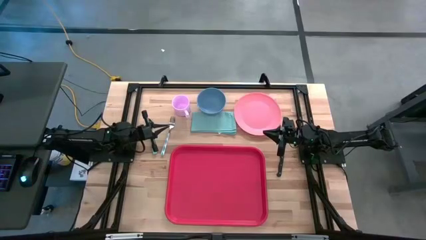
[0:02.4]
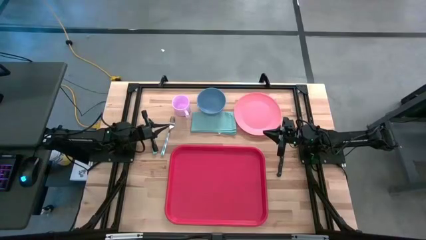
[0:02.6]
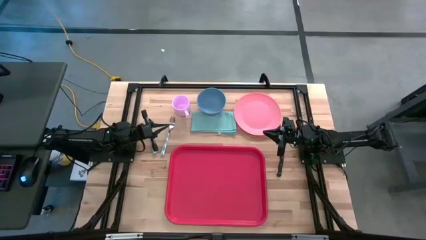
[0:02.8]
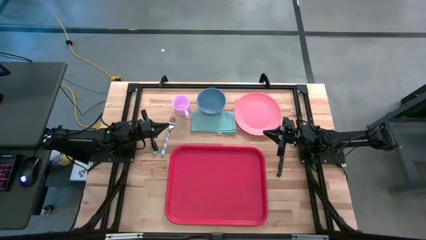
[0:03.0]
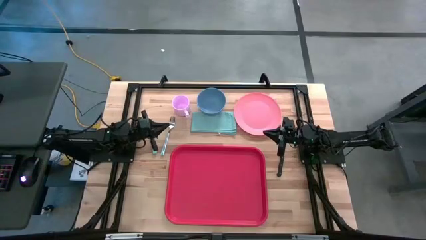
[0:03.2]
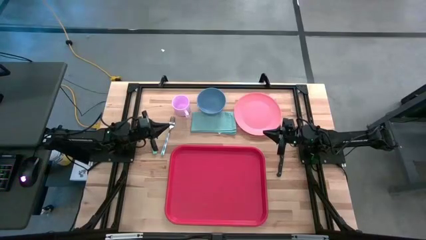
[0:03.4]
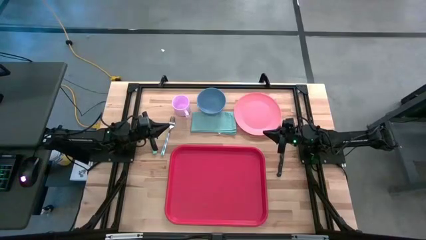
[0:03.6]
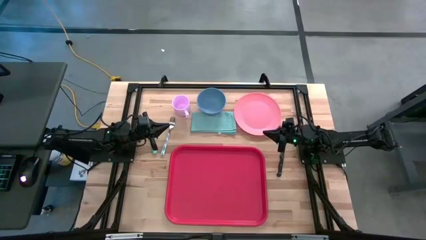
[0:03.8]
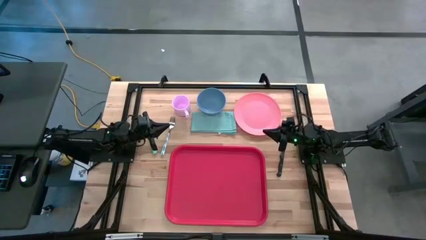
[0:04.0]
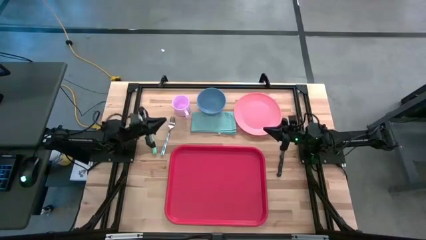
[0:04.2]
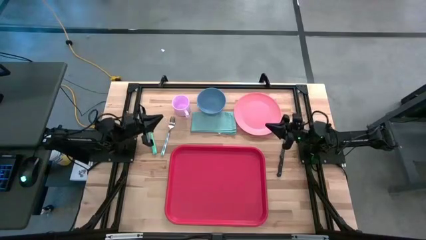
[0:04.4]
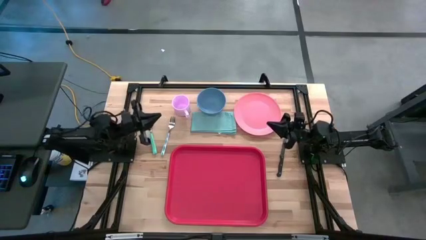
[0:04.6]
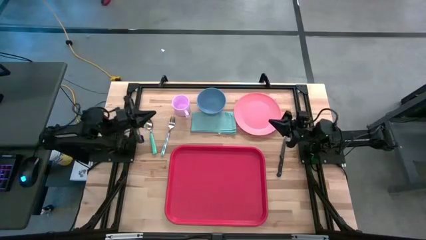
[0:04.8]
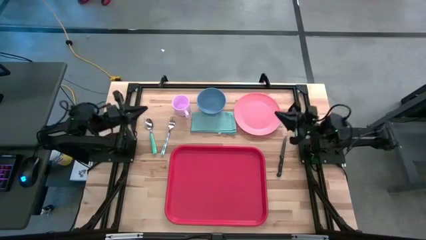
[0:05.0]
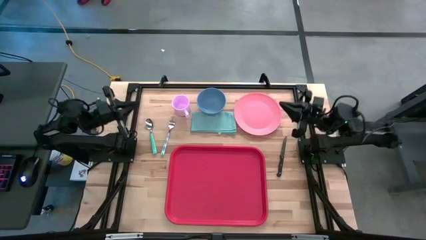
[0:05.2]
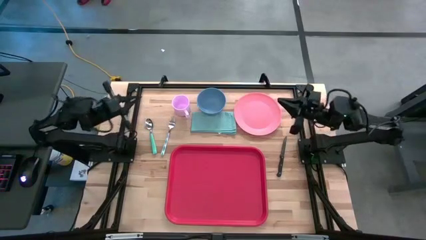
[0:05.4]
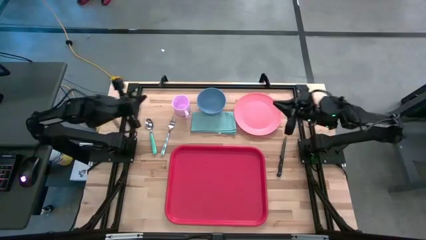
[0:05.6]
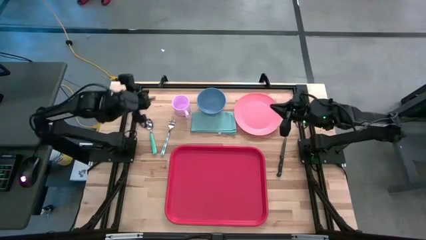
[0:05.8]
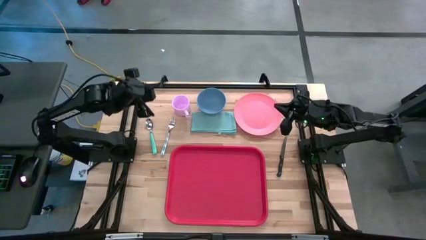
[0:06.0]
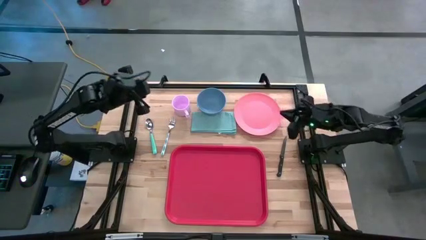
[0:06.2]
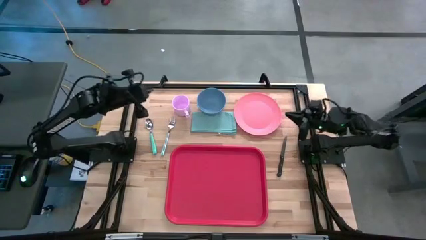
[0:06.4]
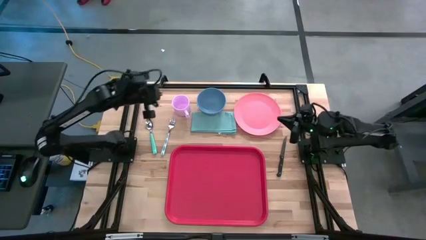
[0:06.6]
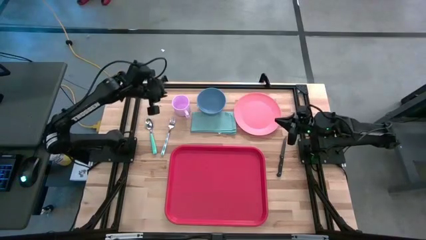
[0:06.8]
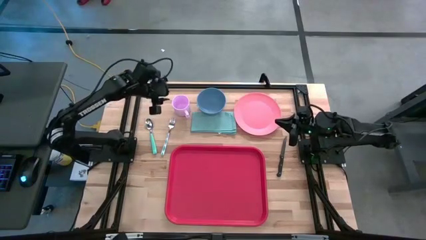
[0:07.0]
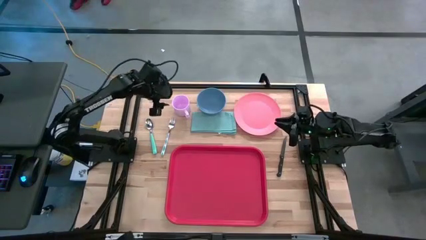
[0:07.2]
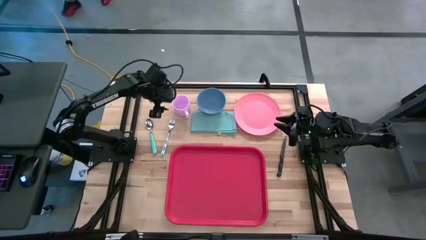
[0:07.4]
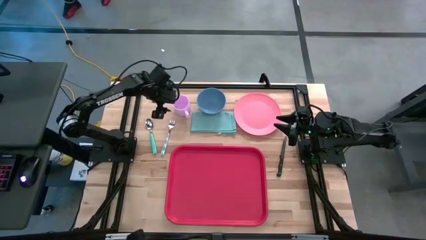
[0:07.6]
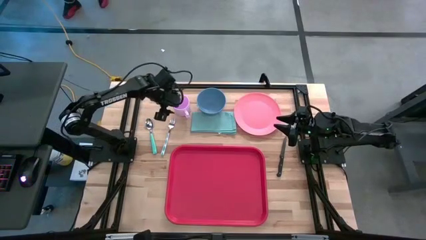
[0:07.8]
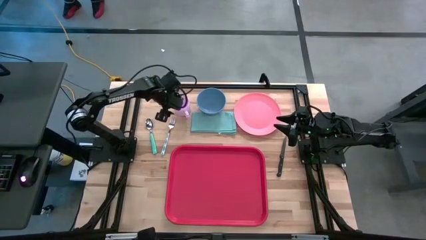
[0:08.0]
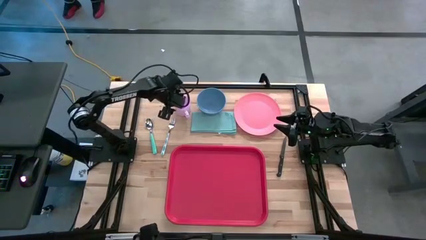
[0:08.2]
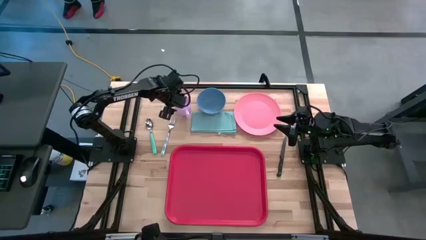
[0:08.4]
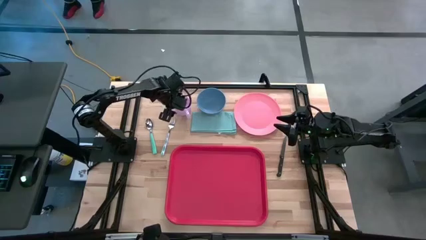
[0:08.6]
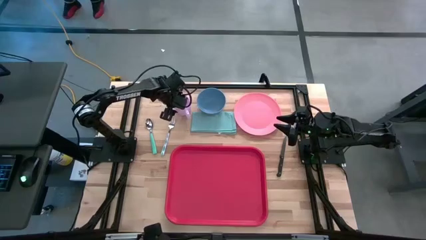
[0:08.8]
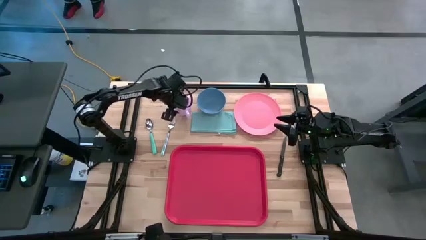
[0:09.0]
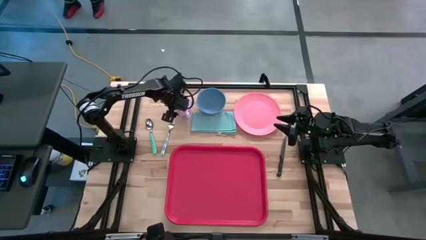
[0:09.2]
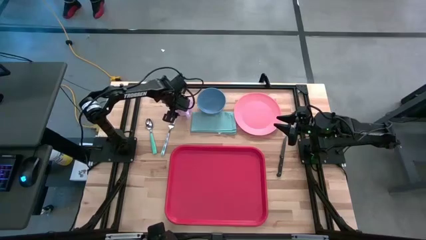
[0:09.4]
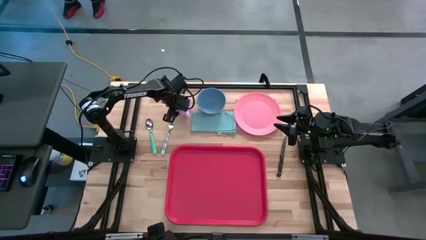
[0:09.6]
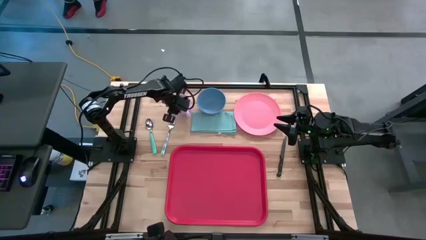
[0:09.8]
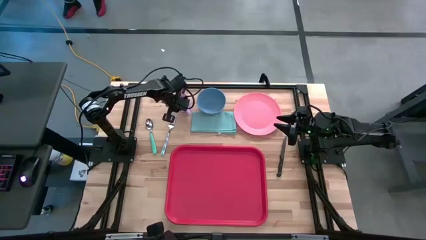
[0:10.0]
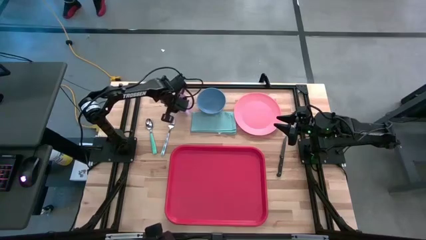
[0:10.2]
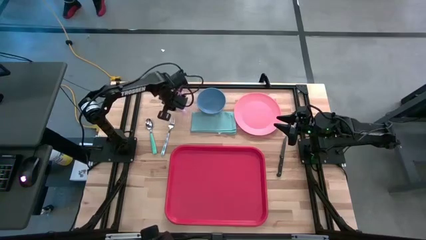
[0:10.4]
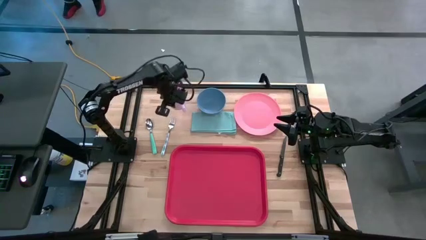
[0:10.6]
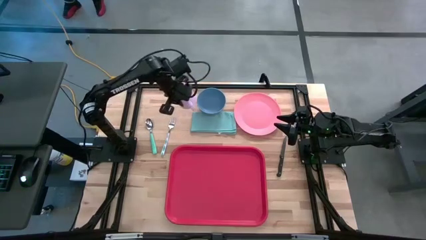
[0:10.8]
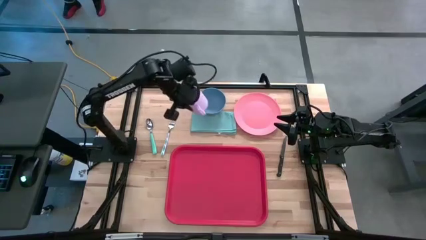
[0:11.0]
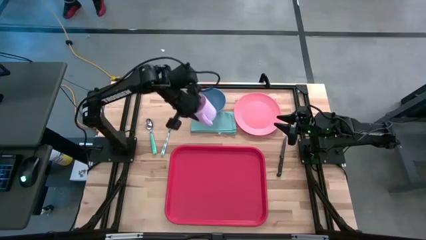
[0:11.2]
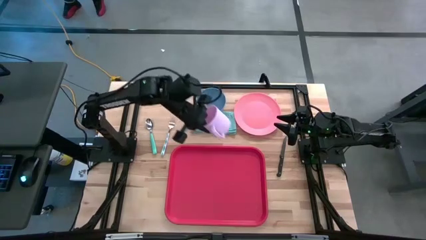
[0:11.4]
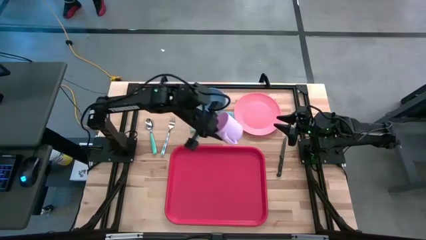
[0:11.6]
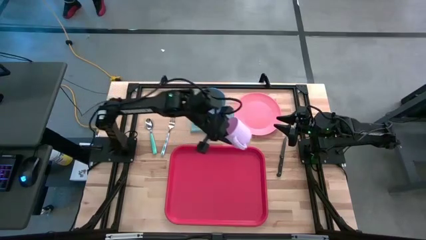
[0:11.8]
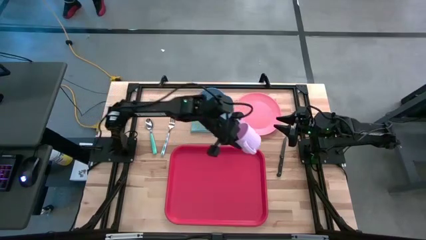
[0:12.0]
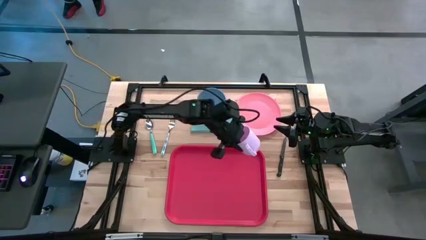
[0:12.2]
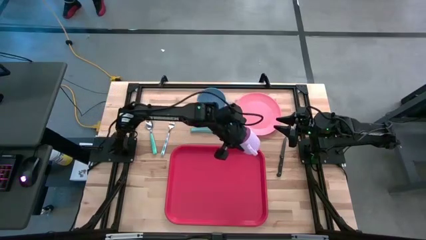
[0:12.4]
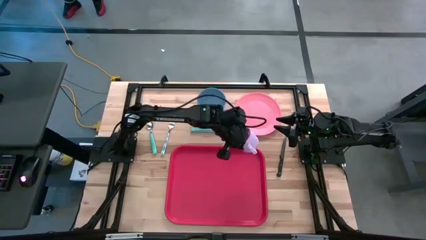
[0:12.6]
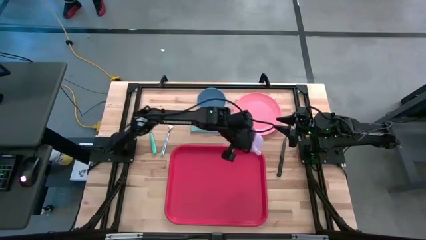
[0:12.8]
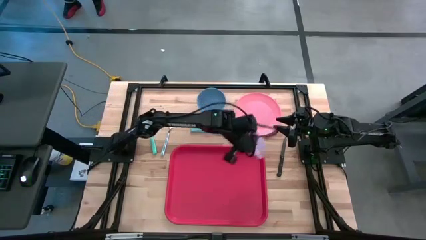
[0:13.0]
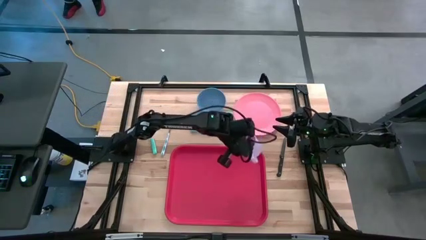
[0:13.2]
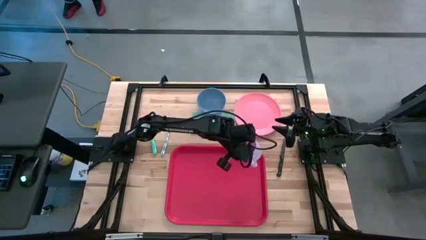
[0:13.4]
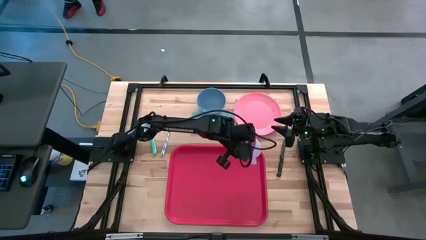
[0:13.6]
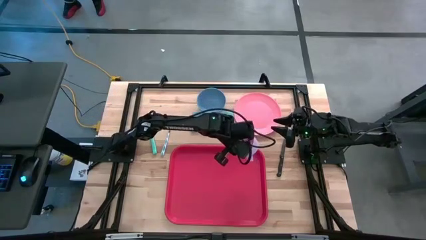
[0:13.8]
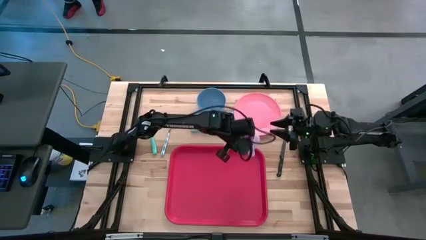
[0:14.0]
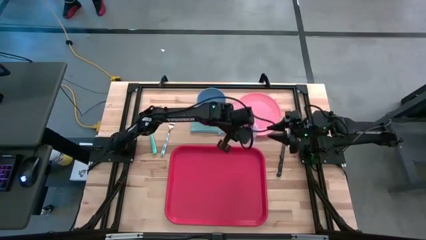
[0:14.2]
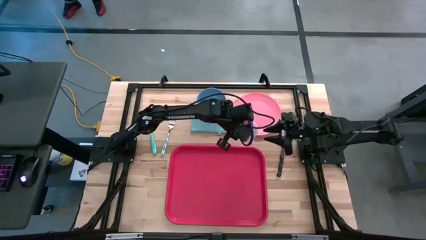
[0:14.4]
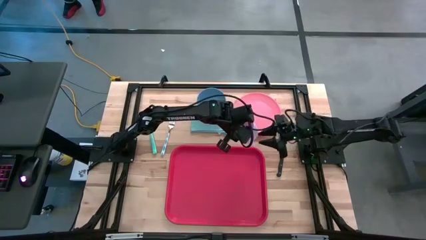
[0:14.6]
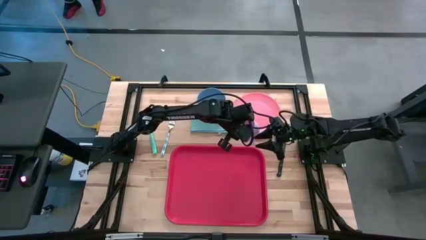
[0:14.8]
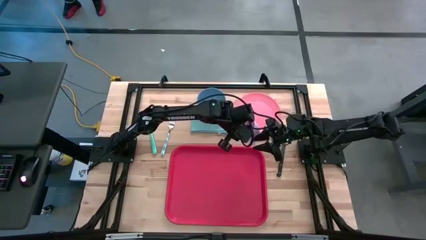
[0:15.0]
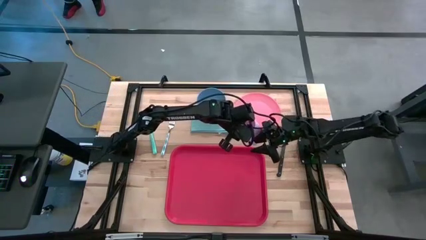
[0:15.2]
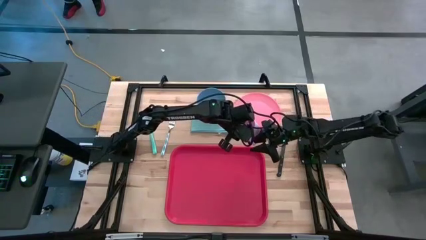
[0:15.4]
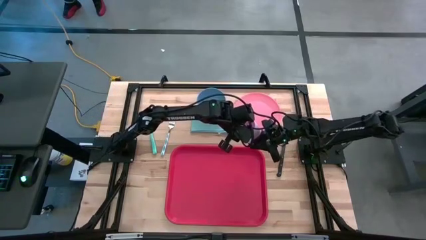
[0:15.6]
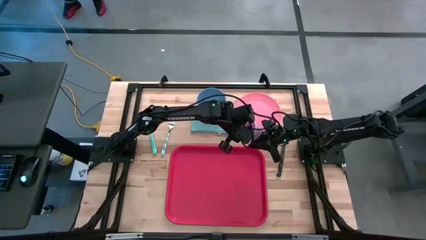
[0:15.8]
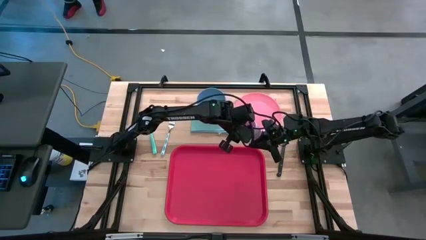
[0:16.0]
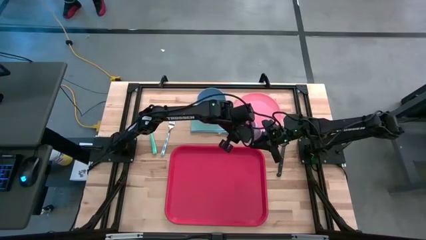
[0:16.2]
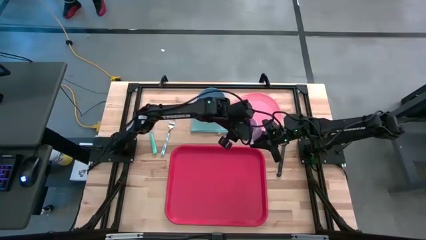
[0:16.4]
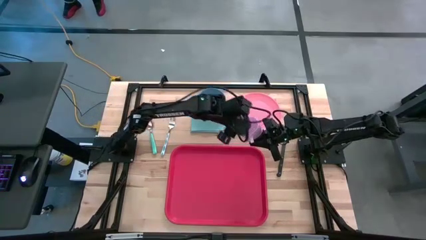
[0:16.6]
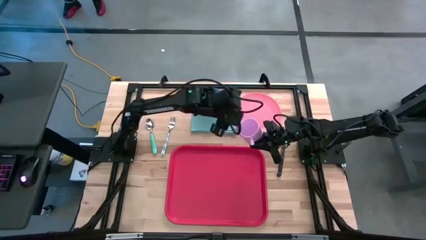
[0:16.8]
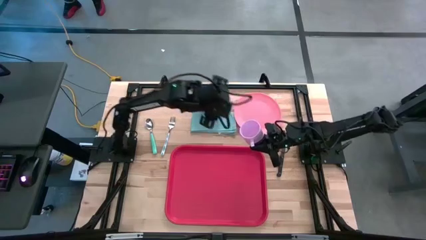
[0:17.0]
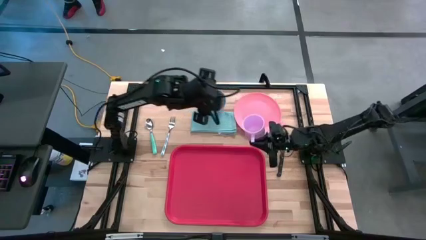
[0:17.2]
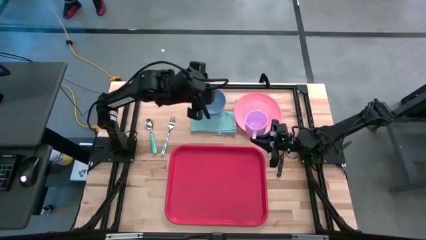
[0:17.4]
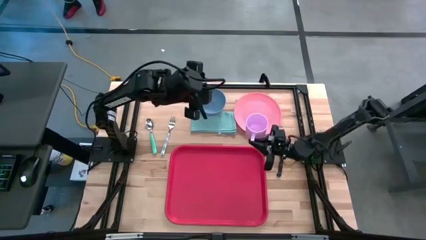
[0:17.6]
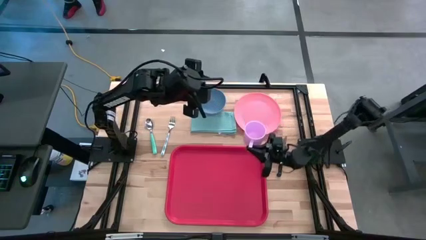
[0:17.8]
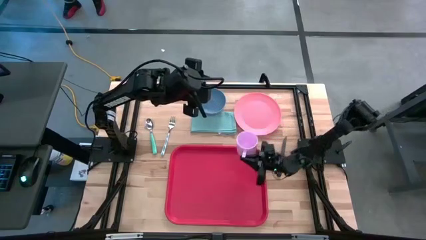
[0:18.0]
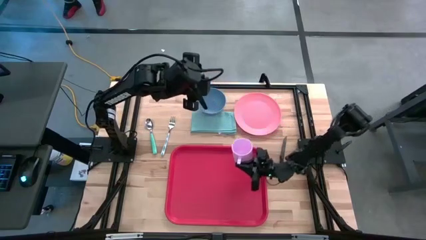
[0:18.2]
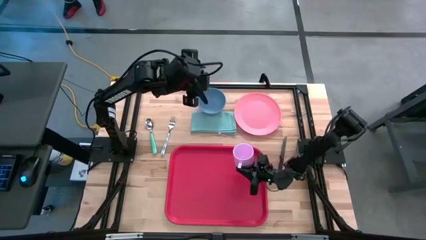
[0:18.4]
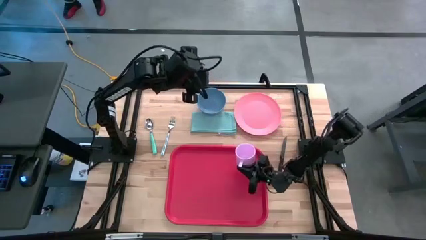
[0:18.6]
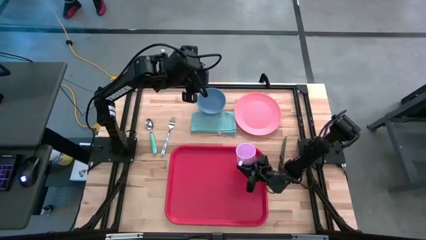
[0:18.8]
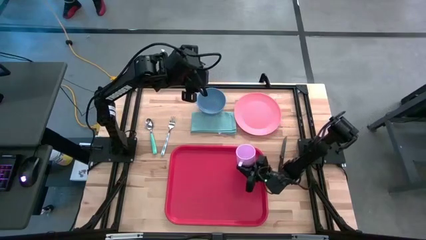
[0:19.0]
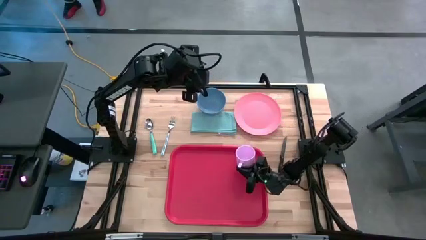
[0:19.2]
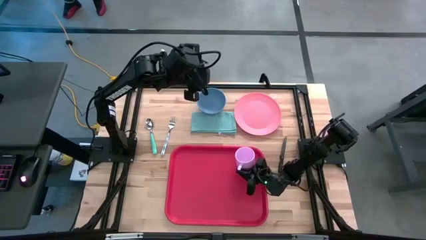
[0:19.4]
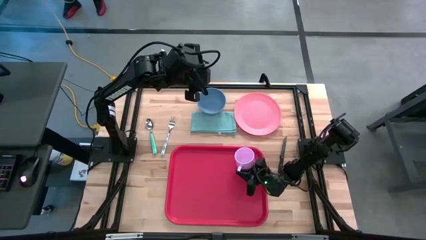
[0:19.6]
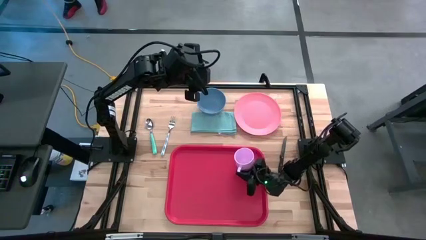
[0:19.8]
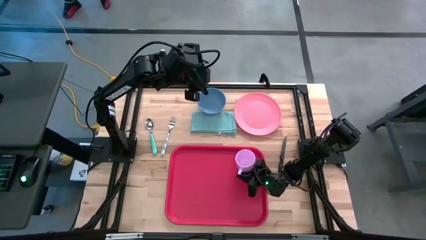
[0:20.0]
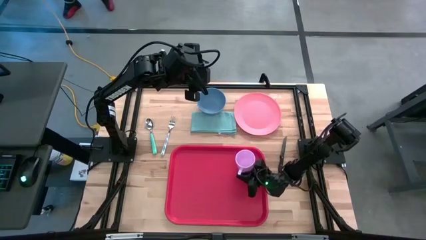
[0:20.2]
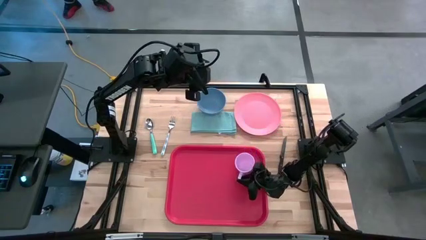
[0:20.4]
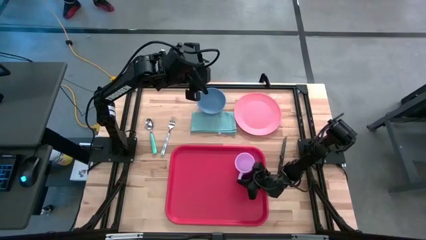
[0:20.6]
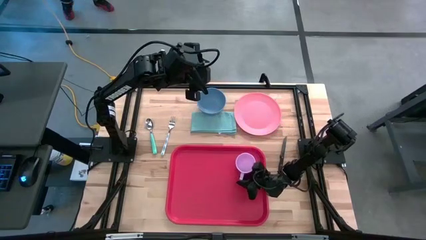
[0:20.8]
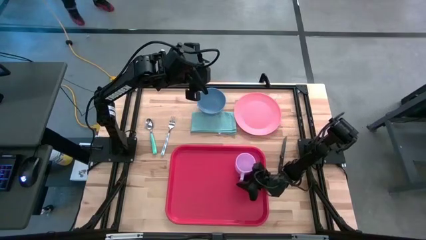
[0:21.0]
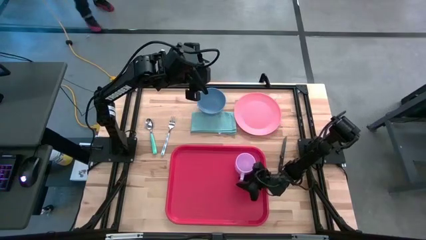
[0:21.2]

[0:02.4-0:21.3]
Task: Set up tray
Put the purple mug in the top right of the tray
